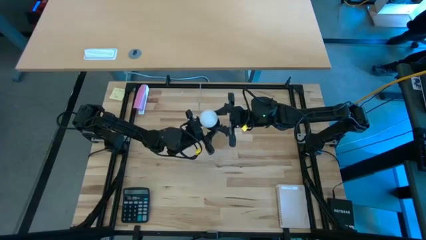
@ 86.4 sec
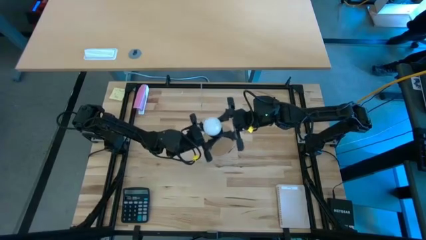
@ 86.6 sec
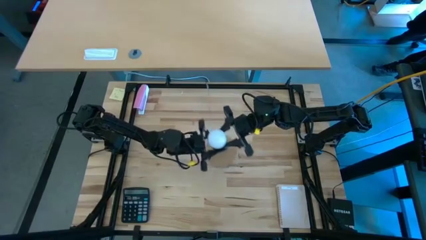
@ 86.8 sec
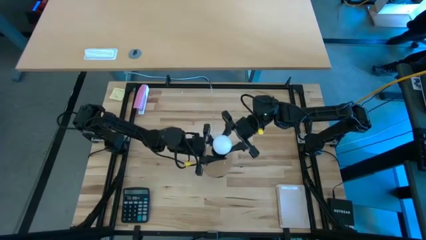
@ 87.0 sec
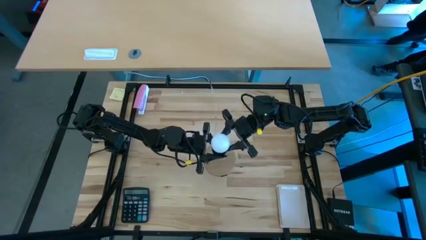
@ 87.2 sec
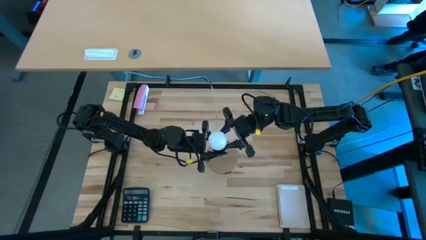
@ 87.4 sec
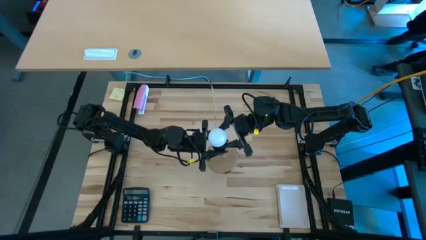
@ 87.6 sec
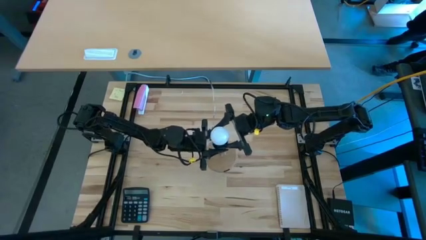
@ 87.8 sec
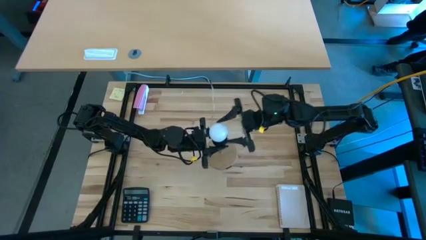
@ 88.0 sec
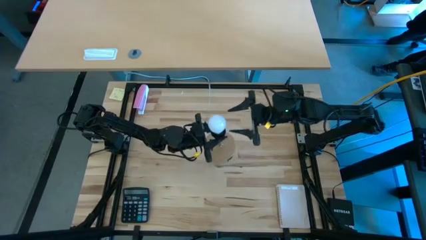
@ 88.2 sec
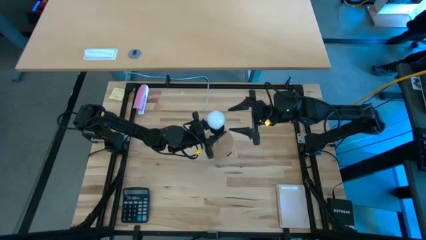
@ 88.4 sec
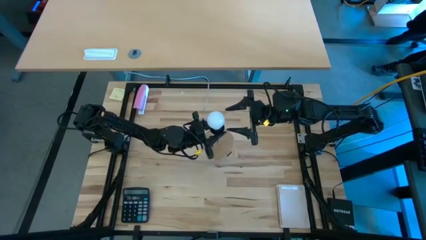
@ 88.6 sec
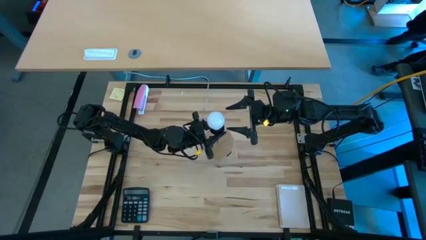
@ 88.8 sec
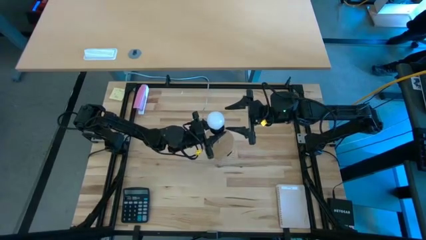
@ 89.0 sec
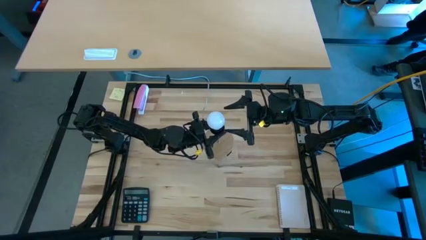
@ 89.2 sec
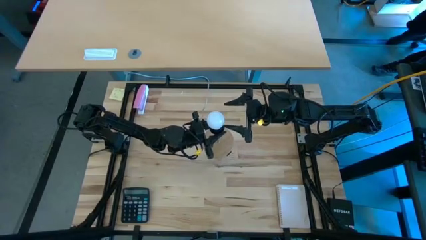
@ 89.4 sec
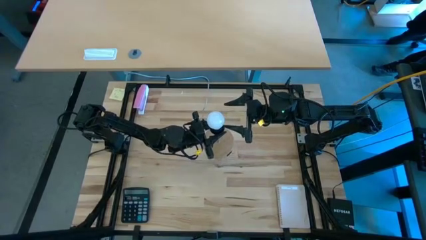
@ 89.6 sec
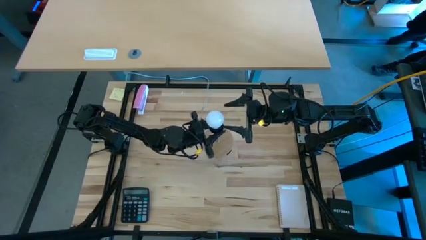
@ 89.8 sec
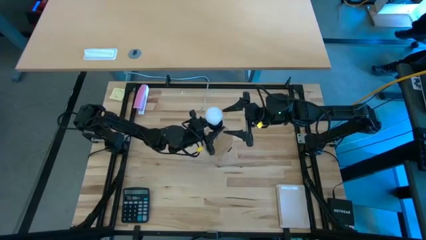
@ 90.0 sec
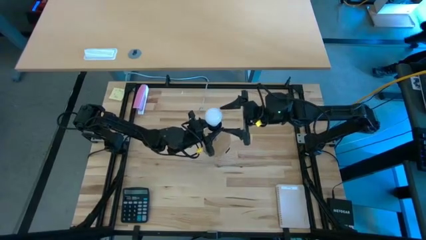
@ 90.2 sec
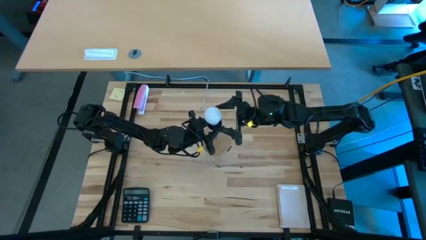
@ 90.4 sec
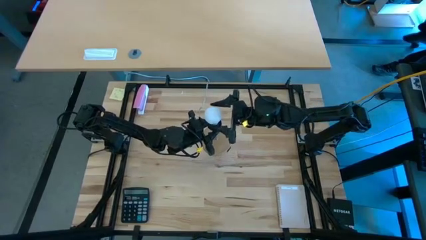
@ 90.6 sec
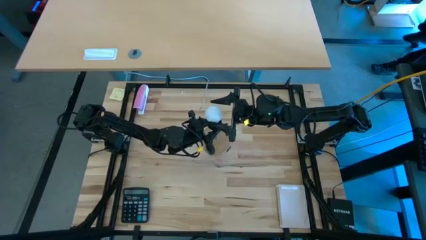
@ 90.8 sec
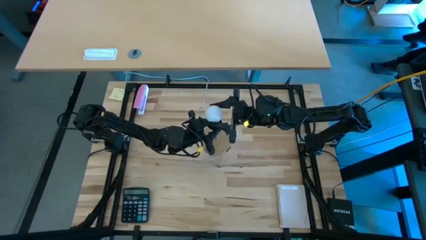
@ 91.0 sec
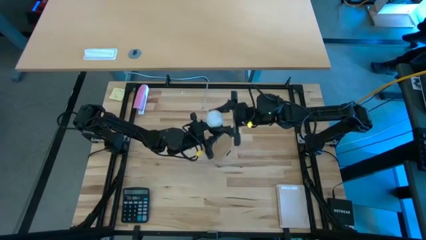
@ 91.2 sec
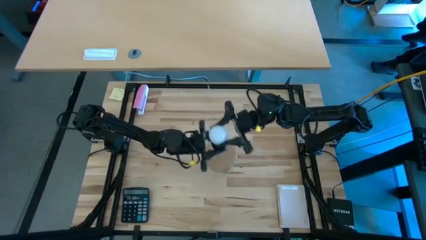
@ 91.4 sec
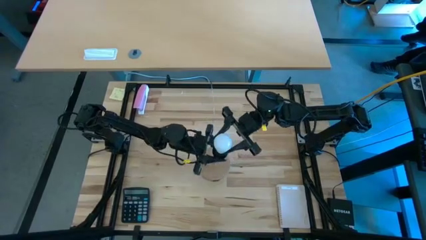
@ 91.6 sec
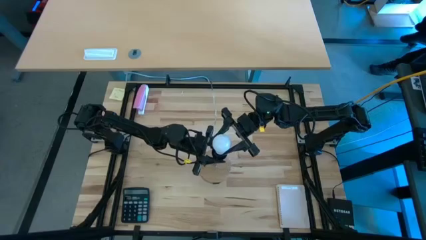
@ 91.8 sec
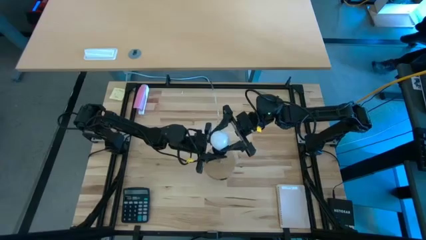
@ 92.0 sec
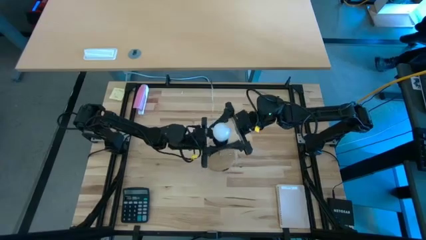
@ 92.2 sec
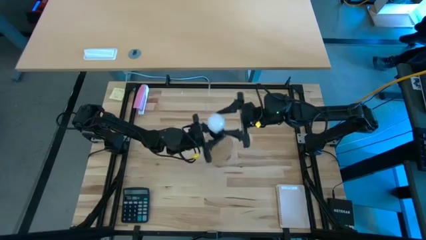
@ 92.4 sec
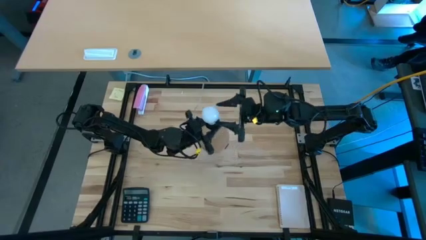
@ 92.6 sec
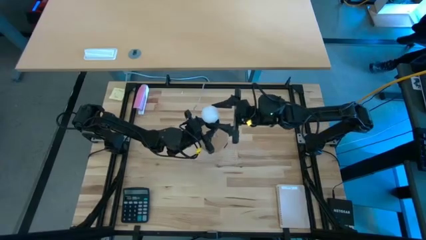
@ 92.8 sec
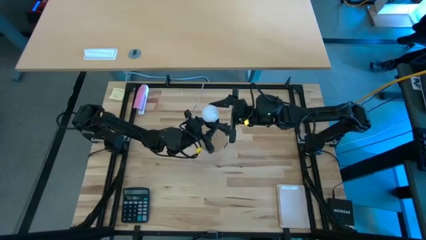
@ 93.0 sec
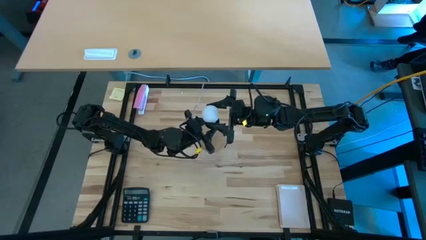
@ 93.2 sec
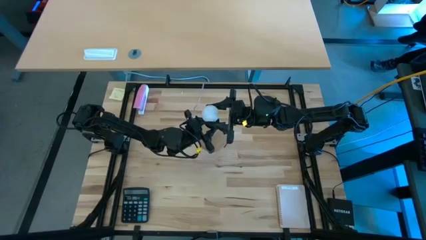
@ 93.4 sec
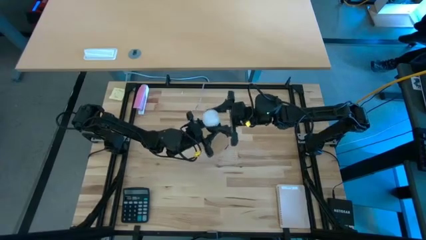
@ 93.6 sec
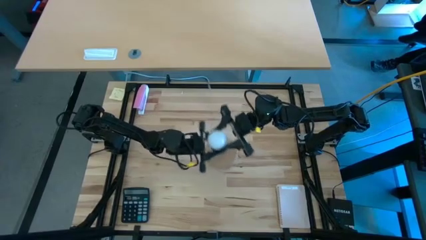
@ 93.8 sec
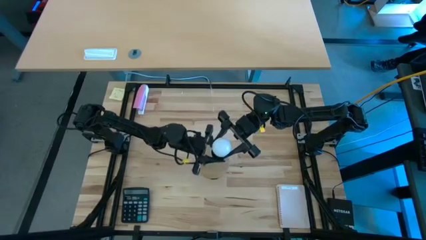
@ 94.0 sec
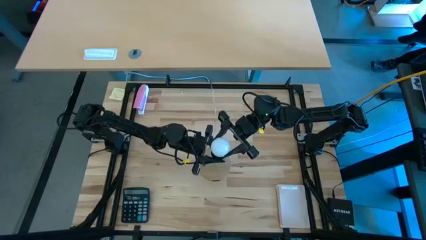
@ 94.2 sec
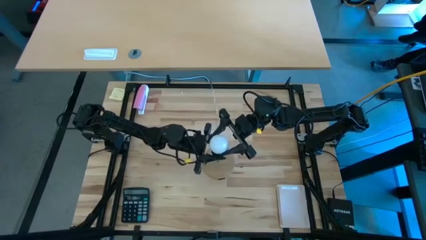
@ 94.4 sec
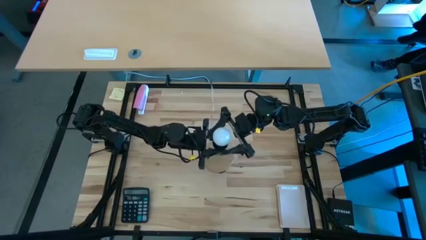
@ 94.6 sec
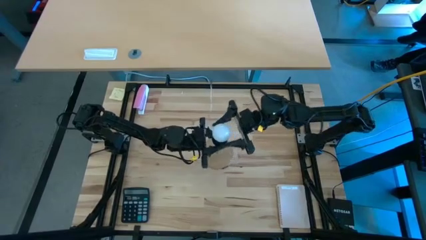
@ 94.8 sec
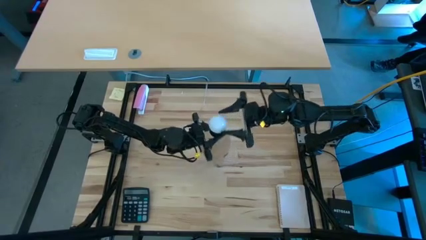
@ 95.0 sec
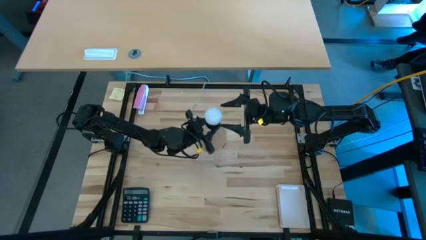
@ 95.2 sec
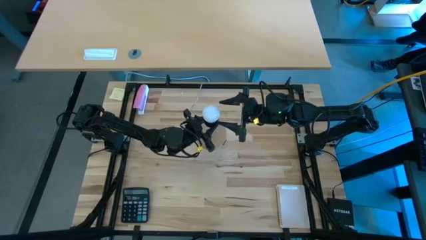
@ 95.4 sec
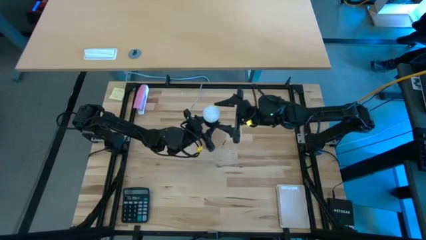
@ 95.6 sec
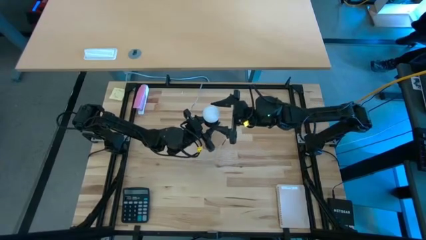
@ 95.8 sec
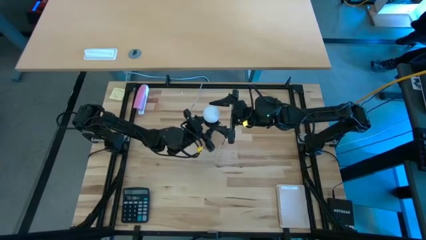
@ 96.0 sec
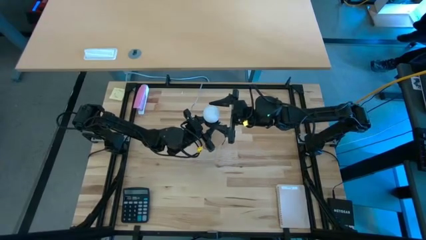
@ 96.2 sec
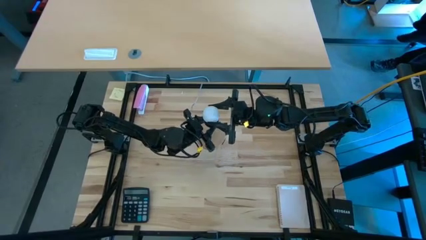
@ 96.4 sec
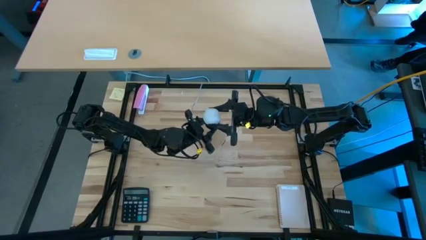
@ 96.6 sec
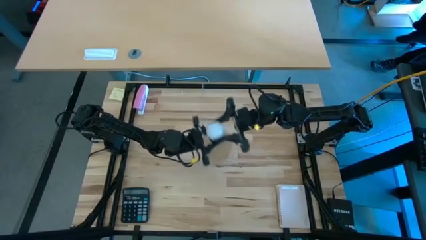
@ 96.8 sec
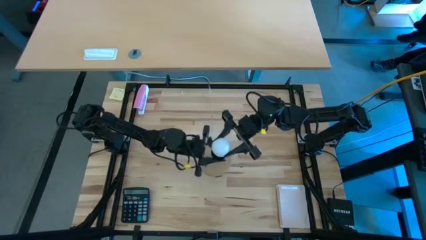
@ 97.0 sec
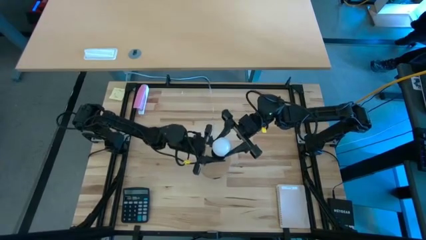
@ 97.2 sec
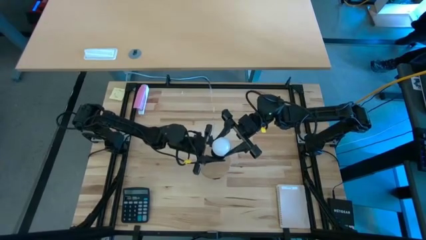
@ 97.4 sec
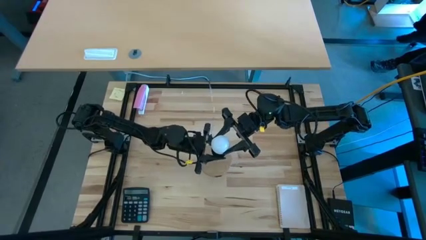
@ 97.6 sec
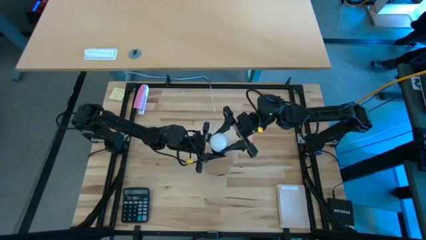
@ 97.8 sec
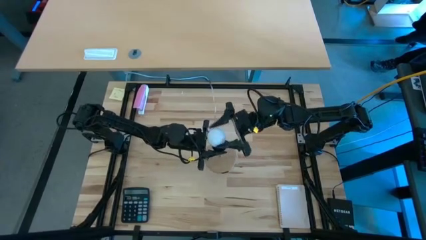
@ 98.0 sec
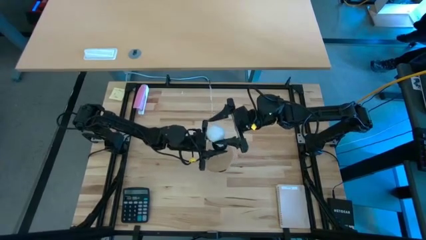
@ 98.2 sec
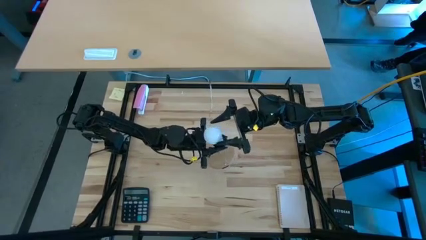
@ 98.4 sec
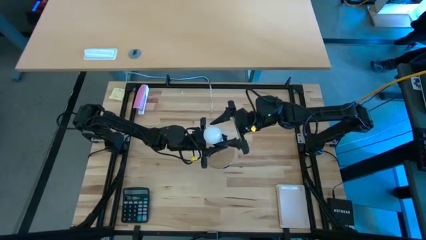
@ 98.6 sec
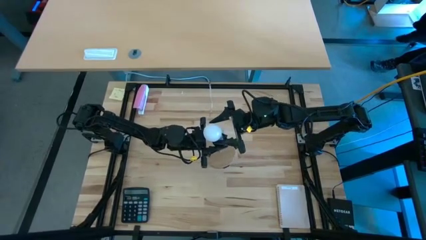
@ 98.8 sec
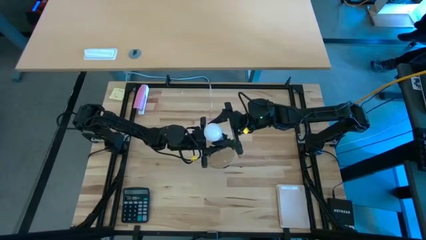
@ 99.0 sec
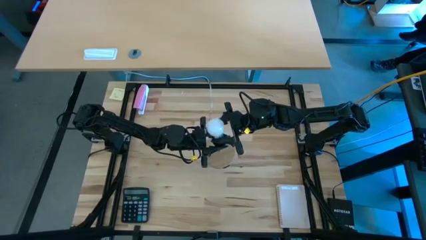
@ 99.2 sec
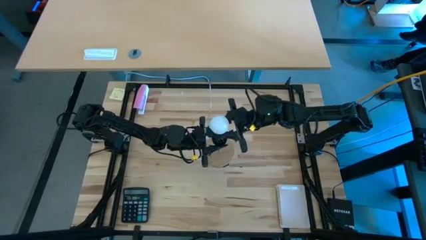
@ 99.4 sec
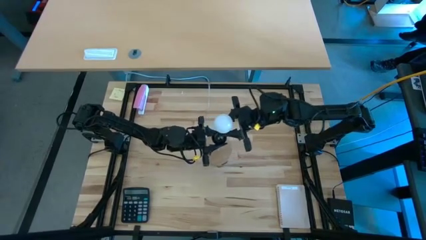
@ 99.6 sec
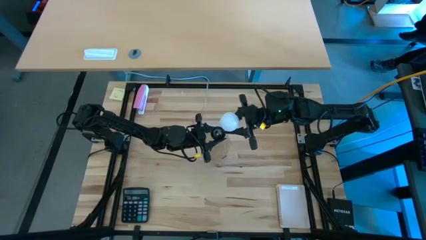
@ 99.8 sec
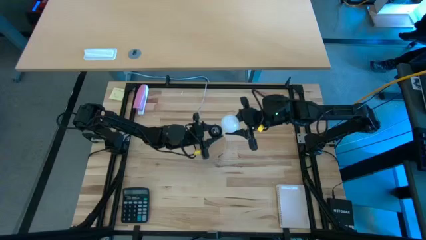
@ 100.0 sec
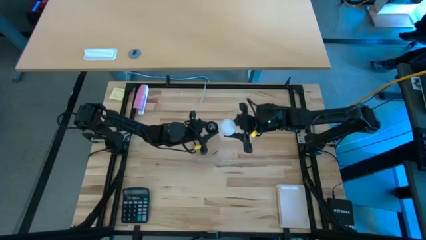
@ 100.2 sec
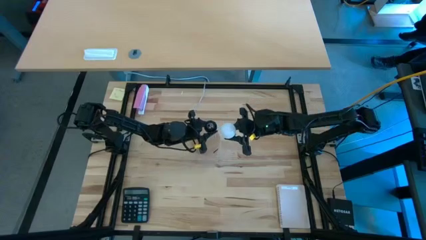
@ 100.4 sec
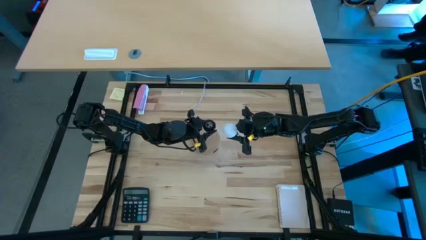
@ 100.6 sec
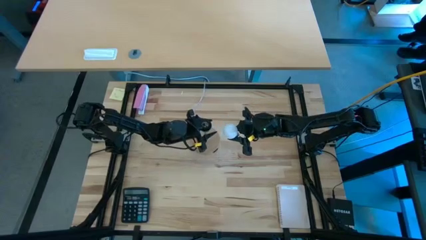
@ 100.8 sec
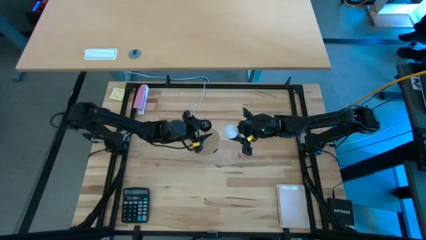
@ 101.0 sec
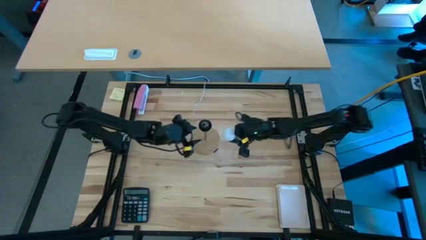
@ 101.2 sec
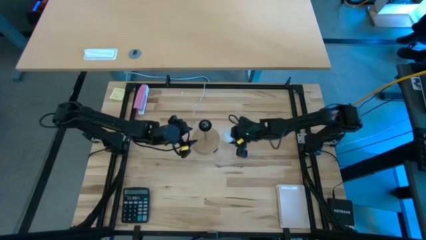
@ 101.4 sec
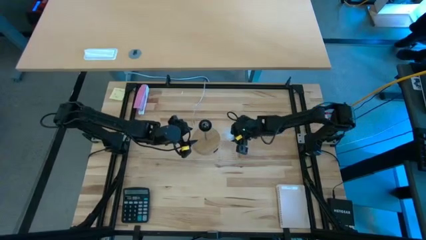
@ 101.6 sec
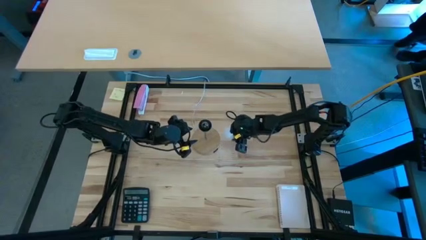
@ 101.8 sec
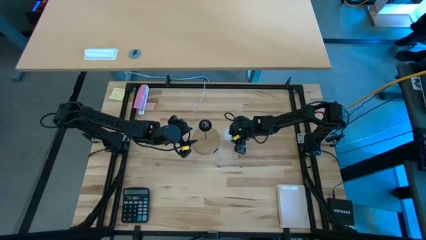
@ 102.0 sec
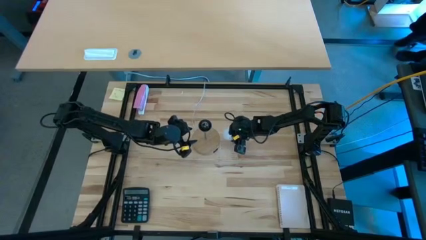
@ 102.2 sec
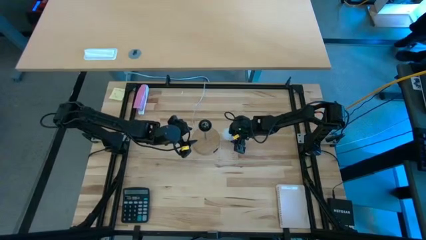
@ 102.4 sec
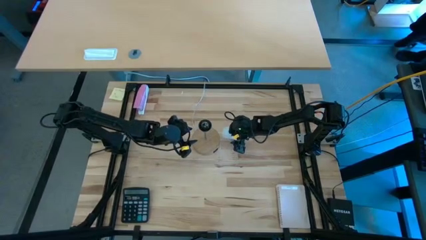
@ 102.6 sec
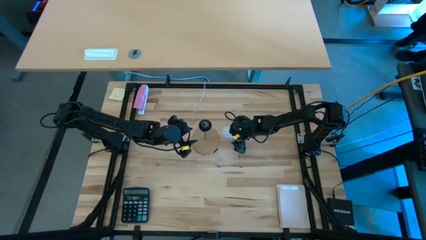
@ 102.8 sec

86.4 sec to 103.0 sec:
Task: Screw lightbulb
Remove the white lightbulb from the brown lamp
